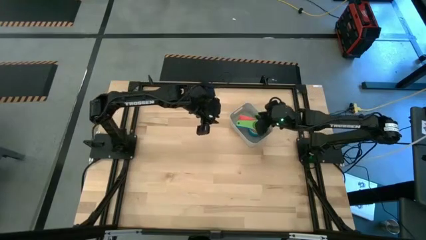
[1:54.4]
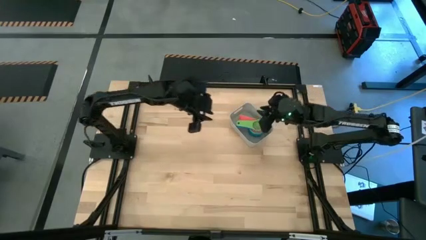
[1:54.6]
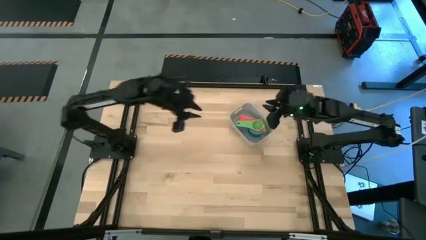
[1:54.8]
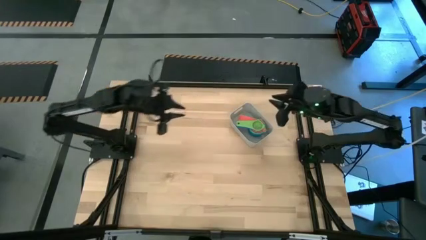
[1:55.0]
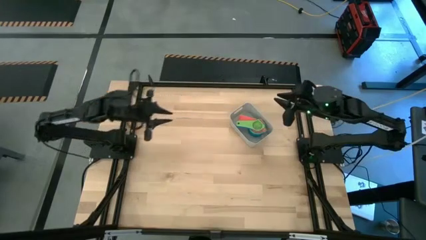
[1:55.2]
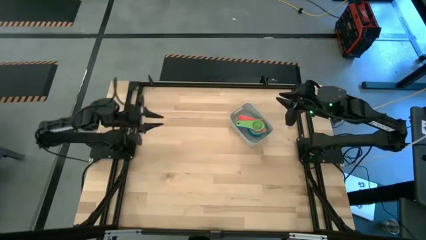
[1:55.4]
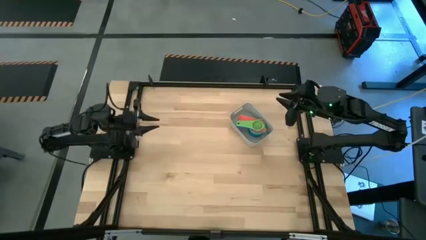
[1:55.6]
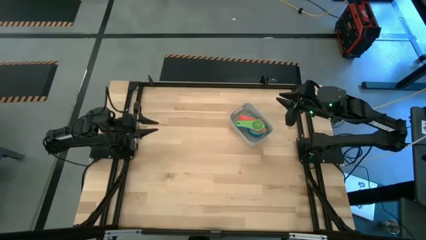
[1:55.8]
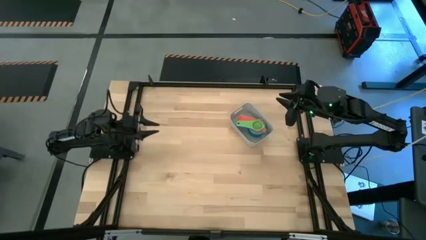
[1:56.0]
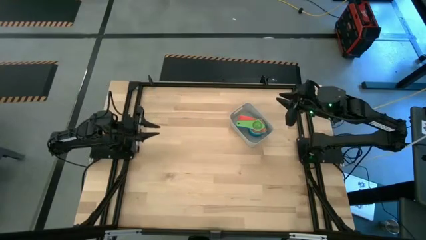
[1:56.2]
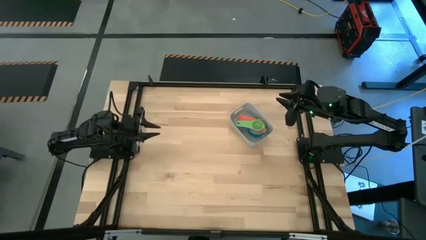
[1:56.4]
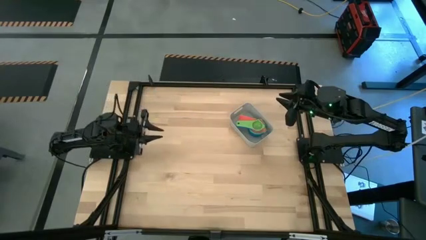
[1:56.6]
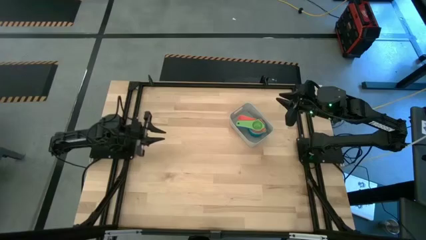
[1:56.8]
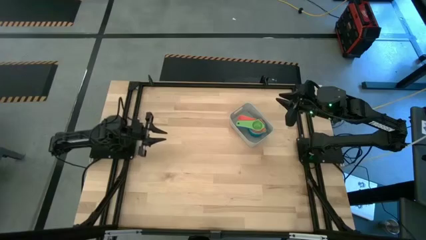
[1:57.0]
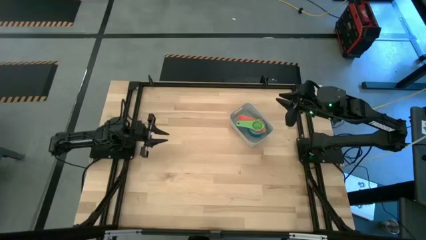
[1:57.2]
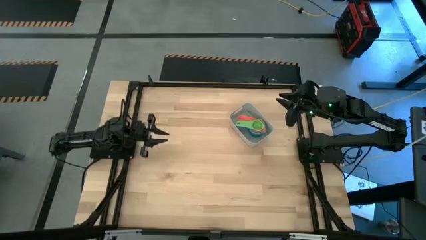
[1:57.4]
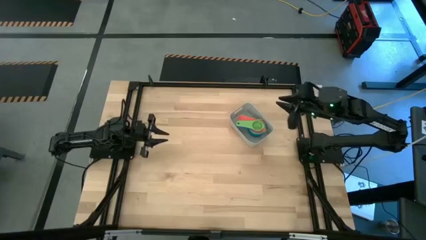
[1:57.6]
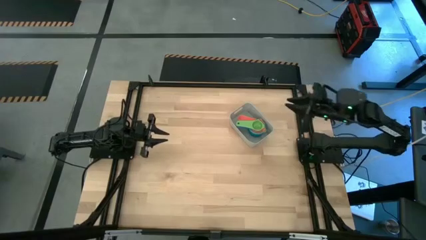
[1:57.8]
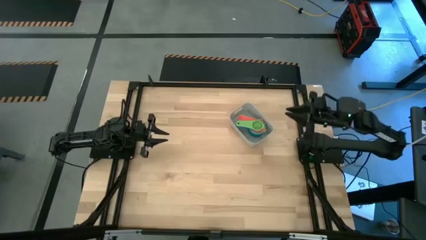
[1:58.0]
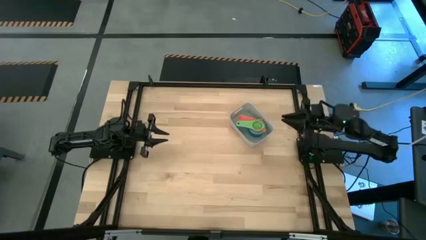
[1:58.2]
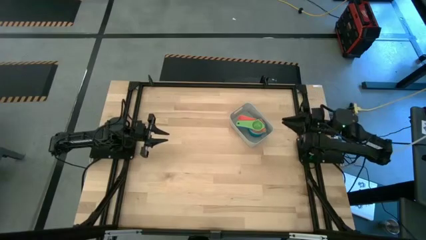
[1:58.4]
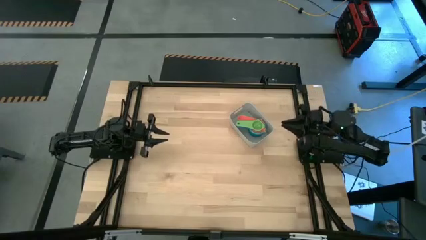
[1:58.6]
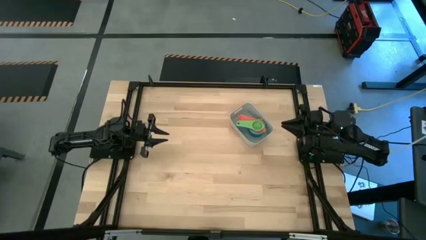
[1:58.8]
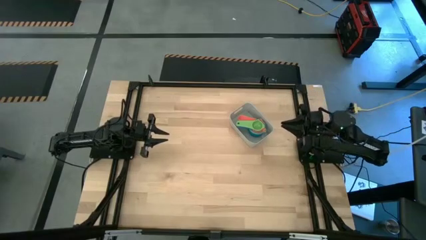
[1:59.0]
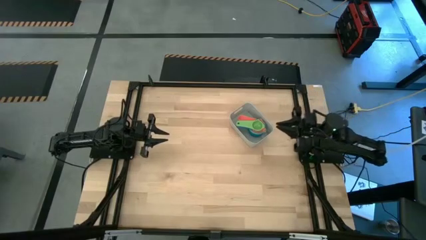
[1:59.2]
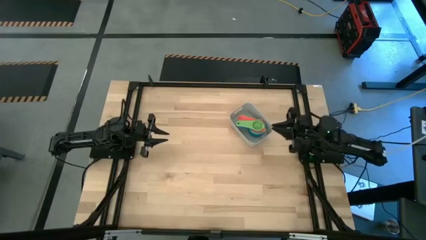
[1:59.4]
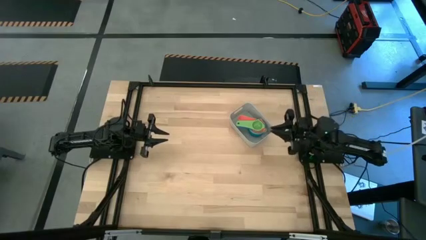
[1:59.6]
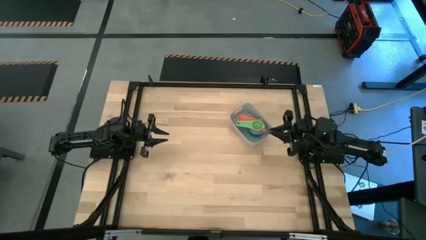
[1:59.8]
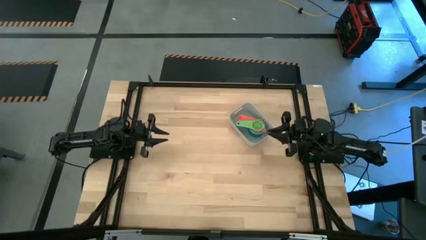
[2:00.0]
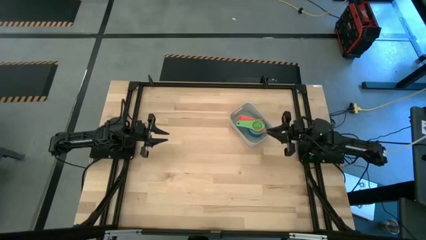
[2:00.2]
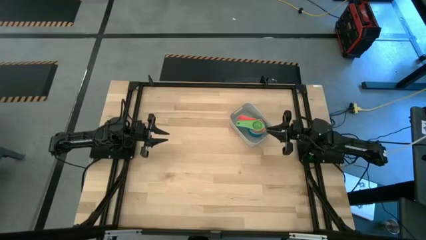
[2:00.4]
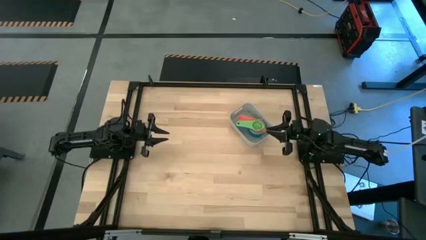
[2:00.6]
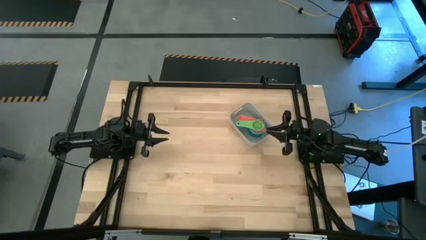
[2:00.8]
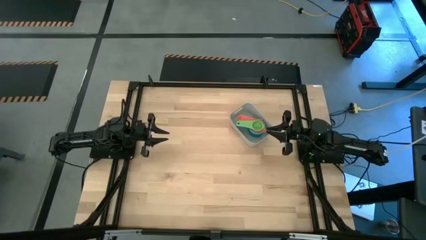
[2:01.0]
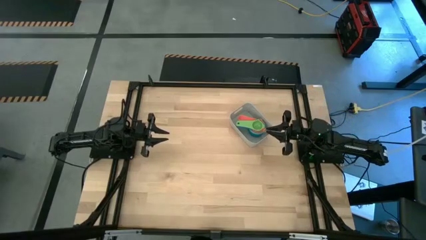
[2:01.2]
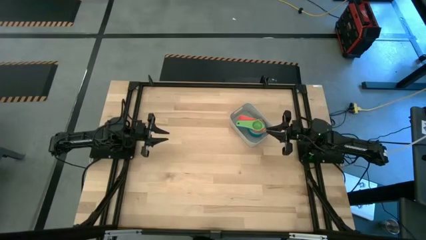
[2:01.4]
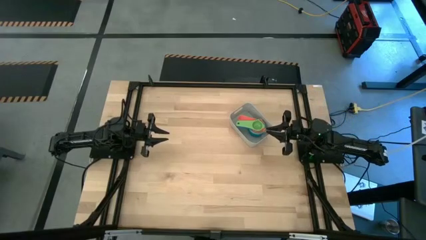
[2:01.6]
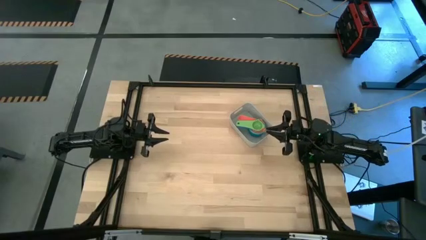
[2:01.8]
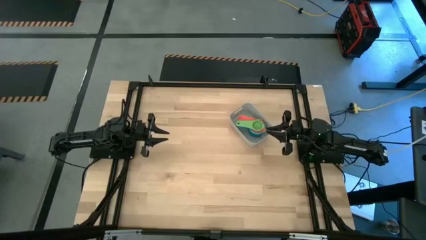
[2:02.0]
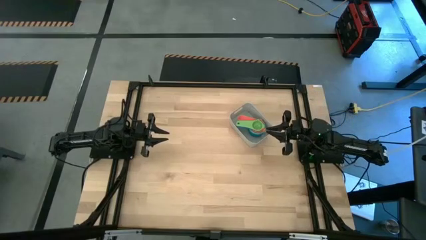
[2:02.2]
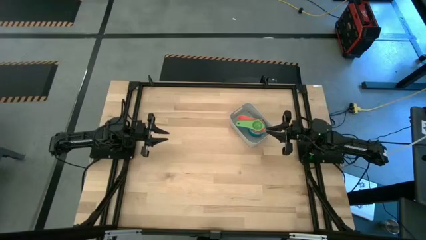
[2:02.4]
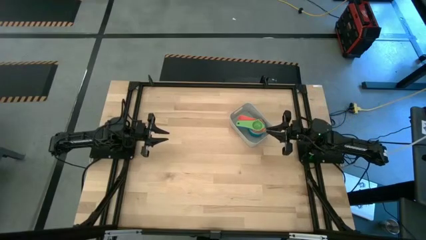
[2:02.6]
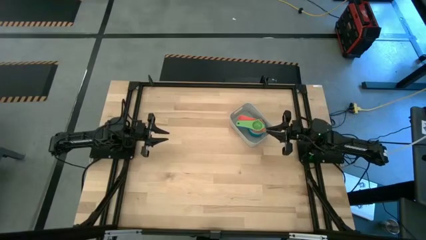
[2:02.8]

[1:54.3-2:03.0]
Task: Nest measuring cups in basket
Return to Home Position

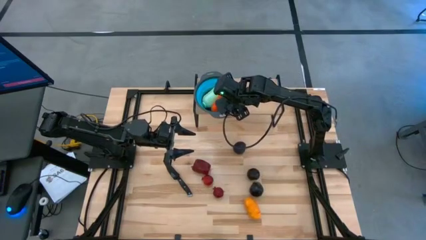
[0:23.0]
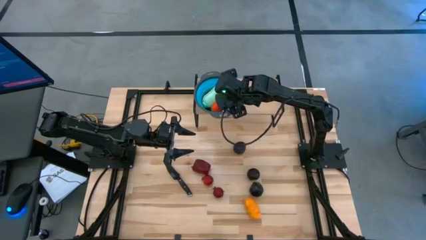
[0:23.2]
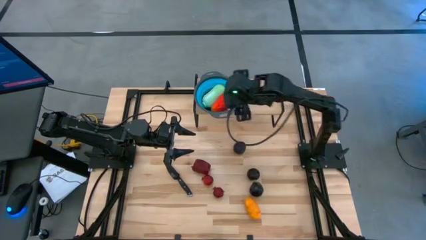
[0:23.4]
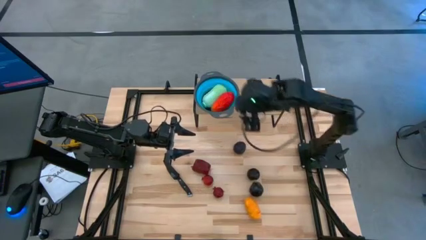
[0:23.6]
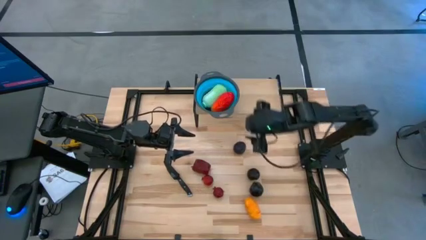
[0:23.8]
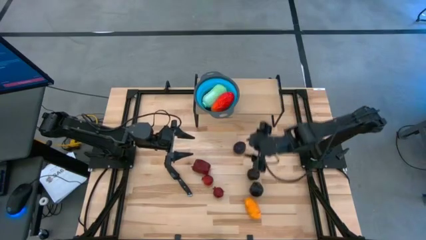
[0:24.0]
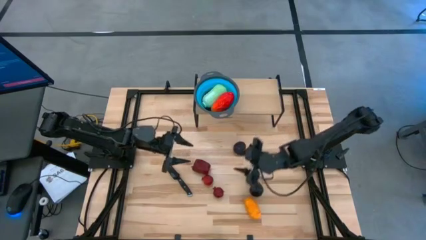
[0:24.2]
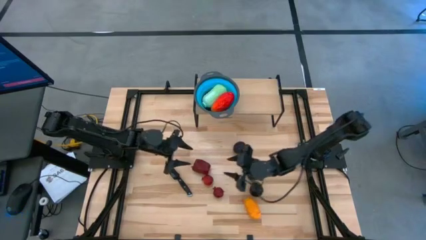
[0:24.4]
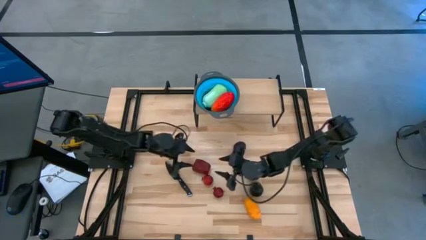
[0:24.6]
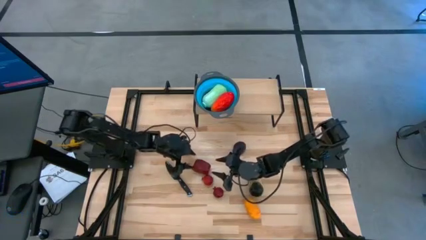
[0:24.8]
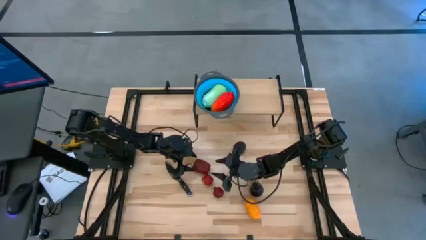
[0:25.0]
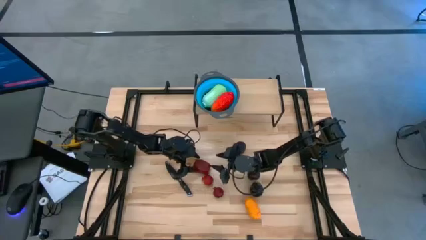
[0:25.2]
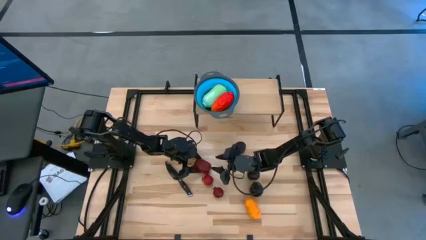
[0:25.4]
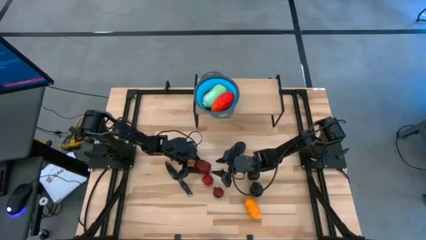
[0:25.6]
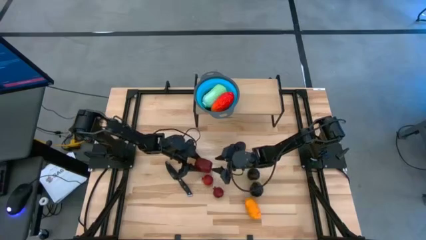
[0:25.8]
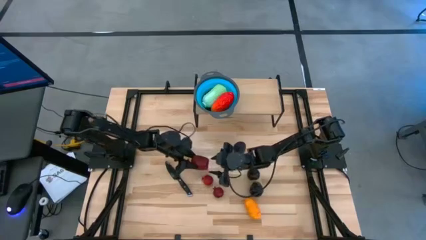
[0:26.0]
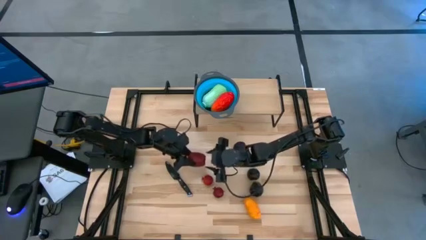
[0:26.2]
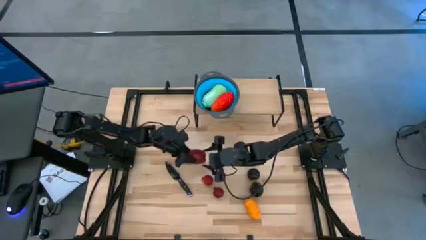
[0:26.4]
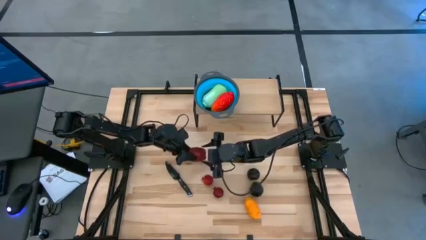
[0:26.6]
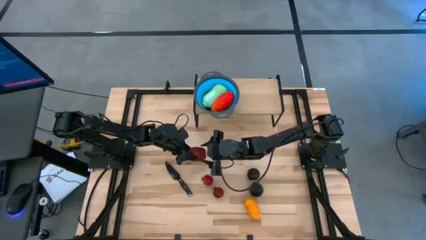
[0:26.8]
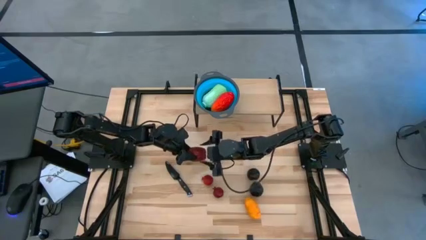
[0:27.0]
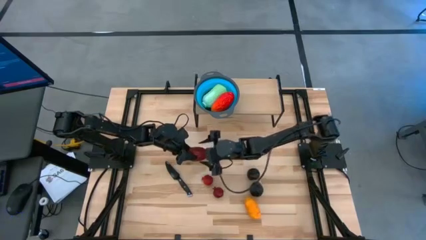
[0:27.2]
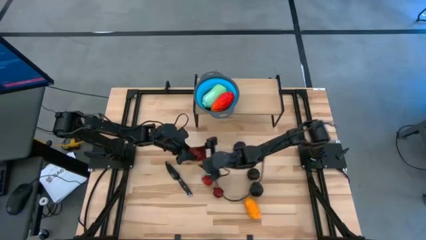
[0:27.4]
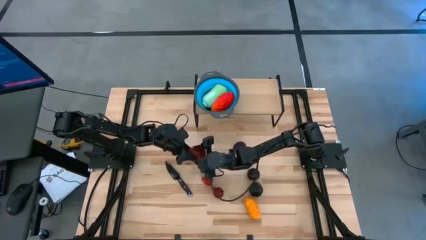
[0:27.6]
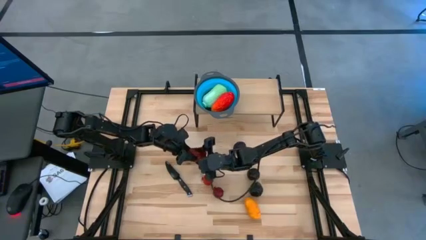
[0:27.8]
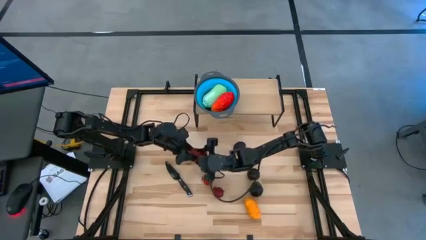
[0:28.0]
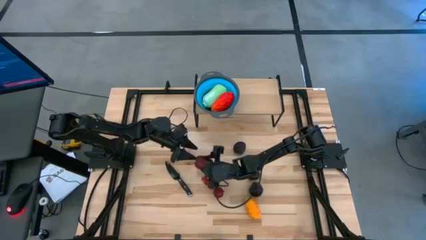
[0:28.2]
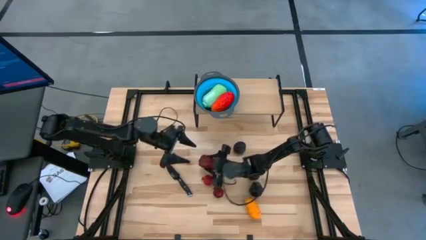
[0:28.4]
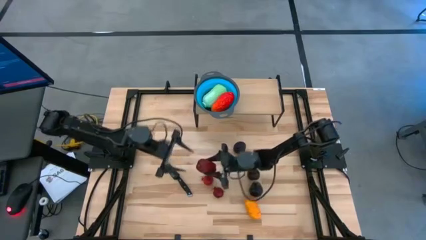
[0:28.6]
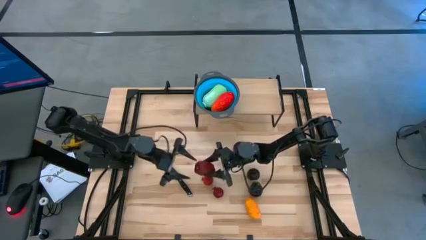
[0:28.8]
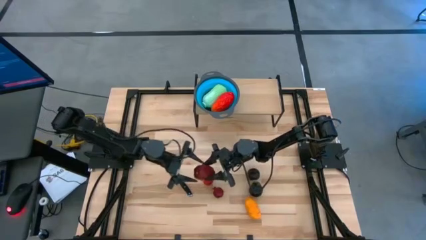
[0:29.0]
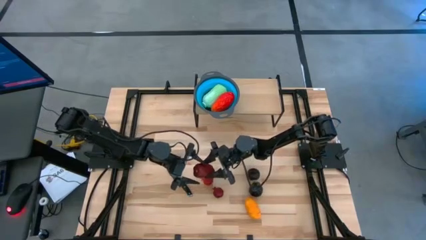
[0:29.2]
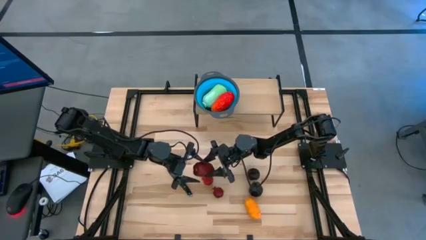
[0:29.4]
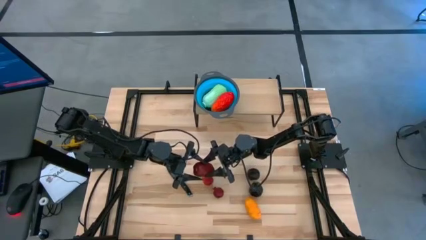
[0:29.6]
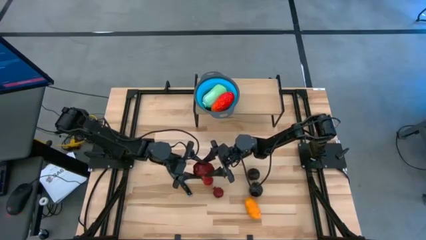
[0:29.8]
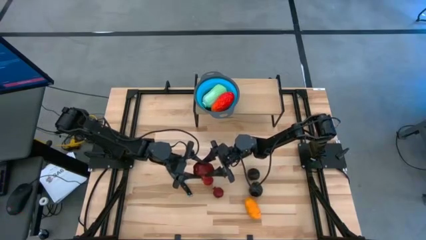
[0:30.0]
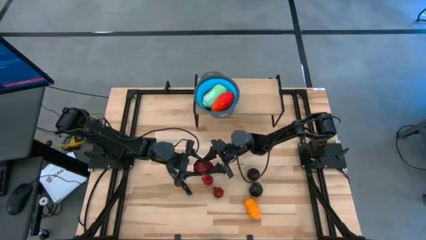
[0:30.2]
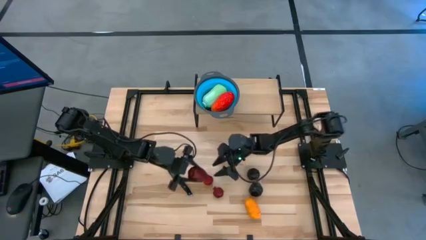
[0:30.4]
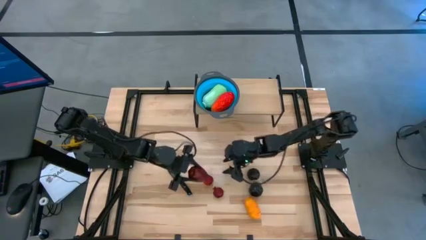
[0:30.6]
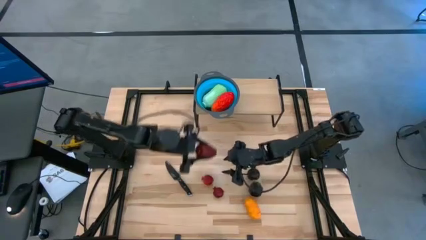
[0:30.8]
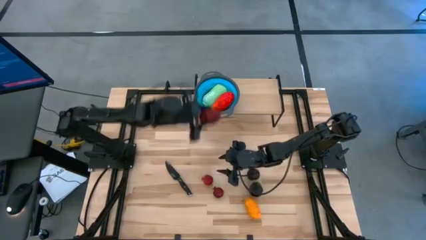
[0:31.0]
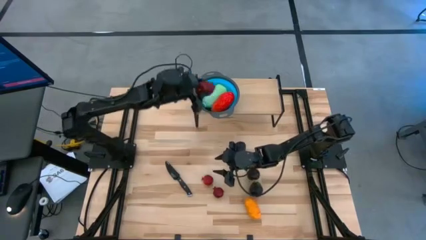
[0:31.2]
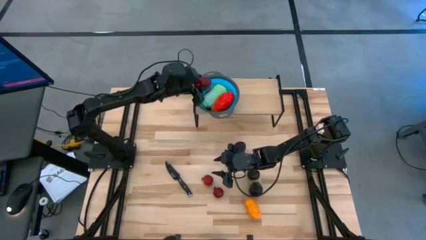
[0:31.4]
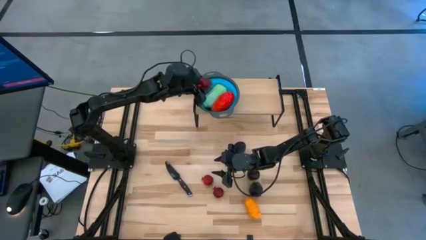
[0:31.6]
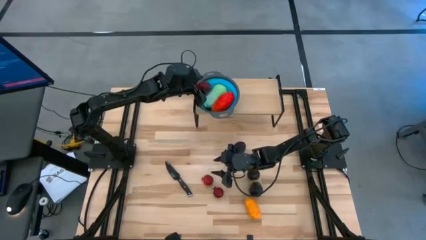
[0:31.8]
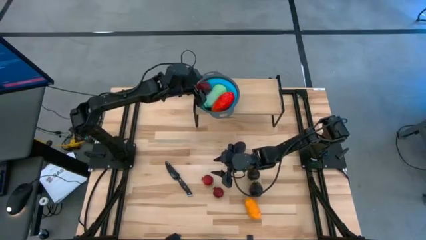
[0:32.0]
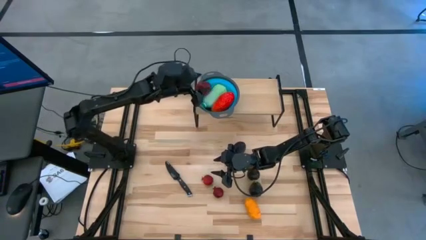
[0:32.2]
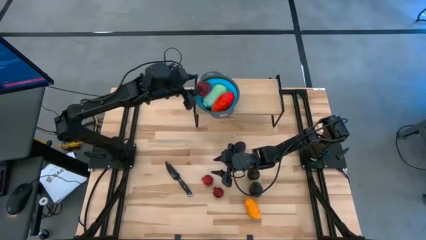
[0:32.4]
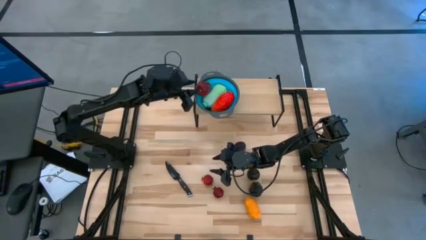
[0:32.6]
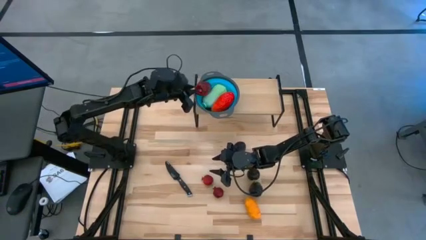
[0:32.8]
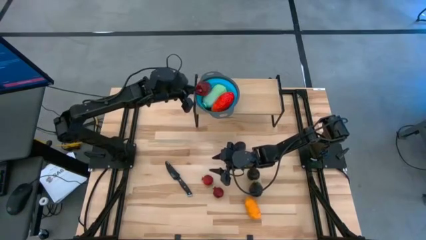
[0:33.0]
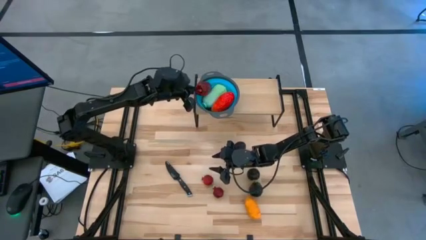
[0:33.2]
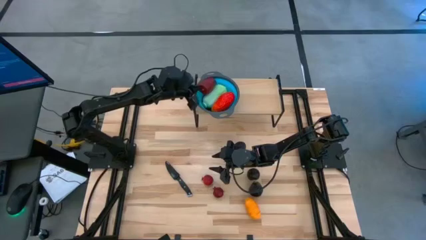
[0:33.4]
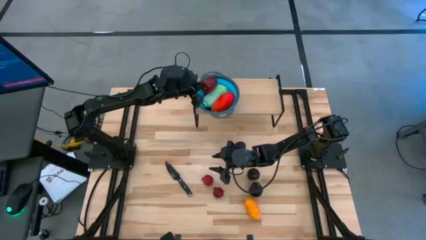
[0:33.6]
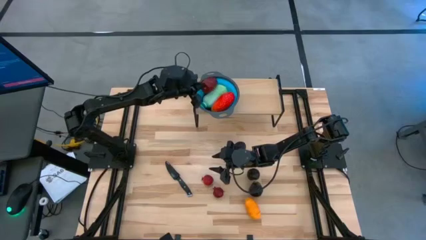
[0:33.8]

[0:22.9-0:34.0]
Task: Pick & Place Fruit
Put the red apple into the blue strainer bowl on the shelf
